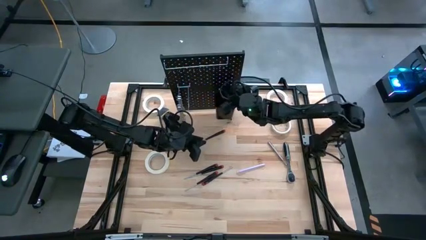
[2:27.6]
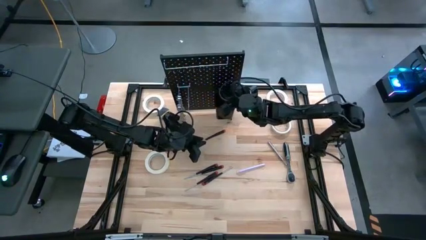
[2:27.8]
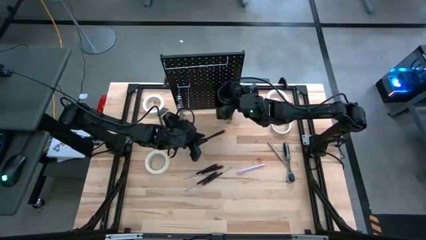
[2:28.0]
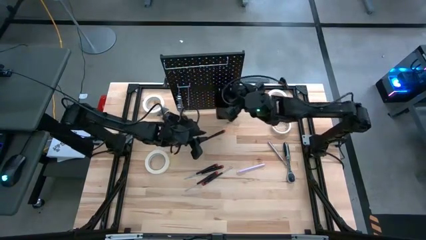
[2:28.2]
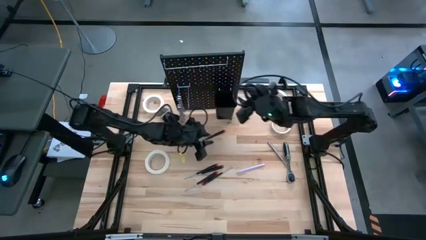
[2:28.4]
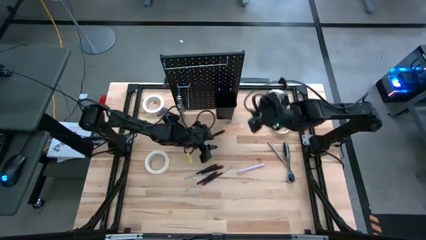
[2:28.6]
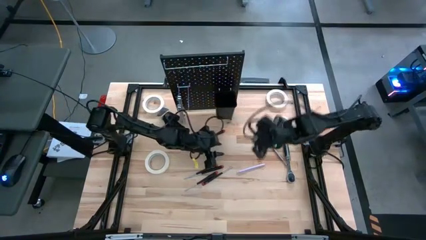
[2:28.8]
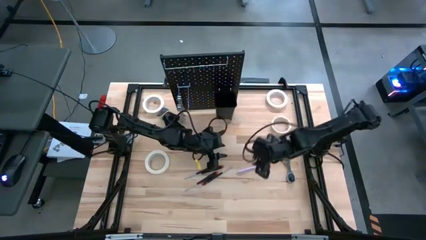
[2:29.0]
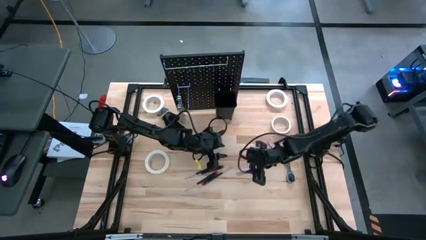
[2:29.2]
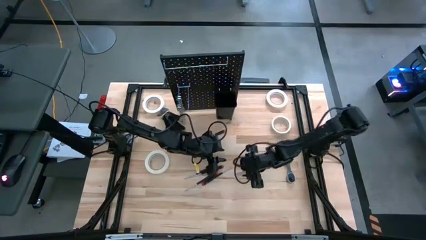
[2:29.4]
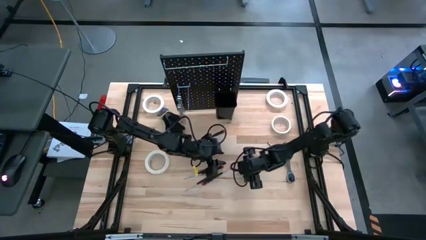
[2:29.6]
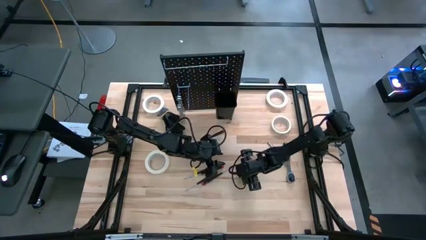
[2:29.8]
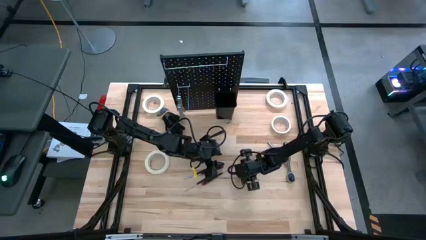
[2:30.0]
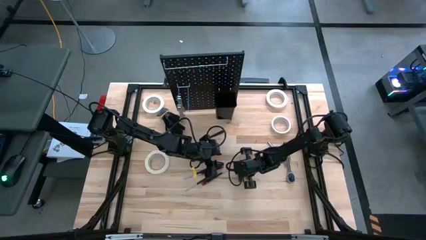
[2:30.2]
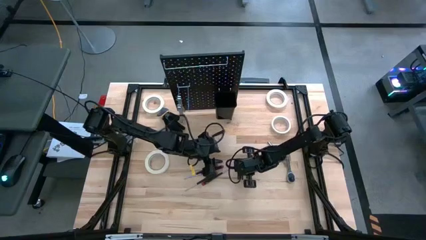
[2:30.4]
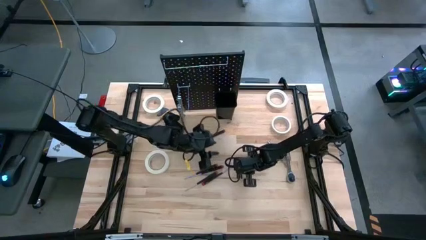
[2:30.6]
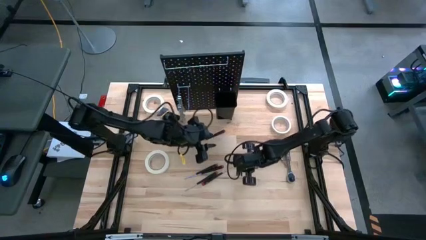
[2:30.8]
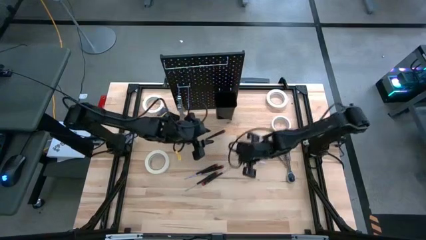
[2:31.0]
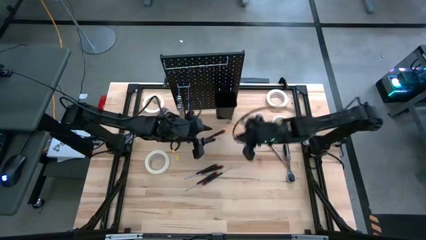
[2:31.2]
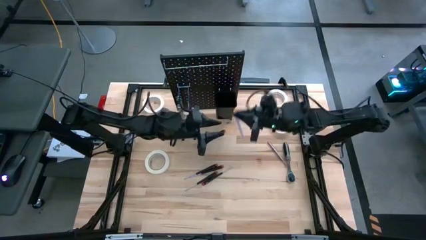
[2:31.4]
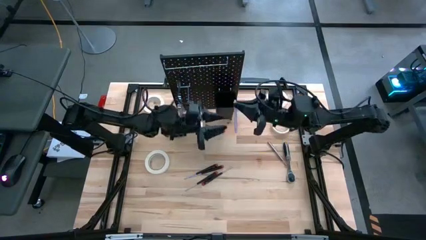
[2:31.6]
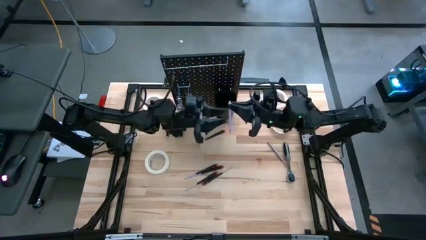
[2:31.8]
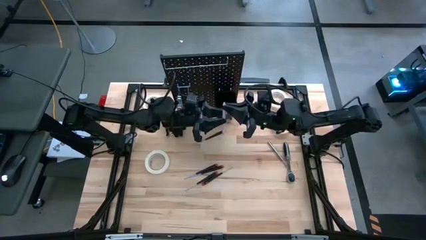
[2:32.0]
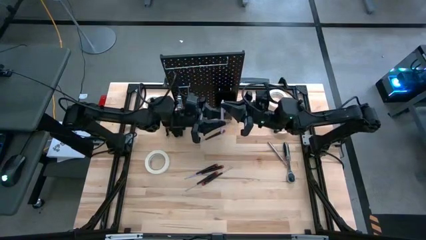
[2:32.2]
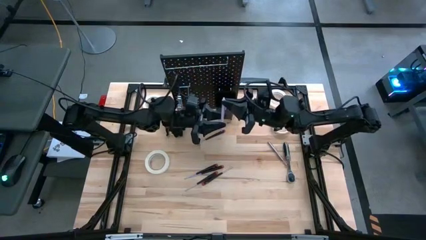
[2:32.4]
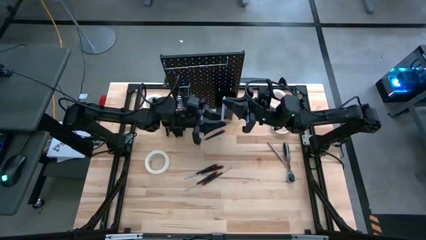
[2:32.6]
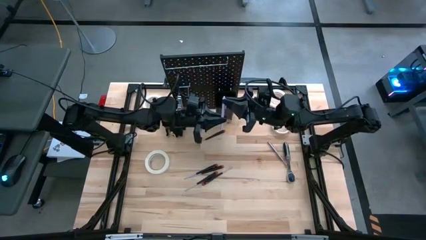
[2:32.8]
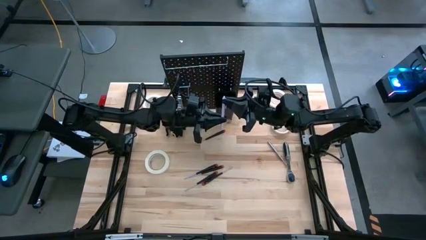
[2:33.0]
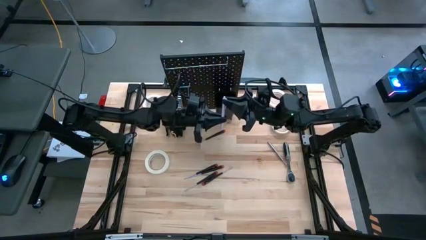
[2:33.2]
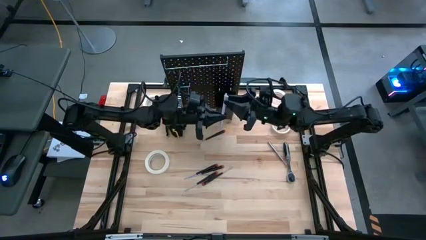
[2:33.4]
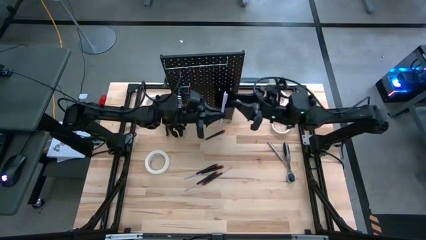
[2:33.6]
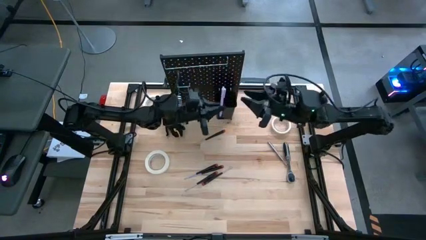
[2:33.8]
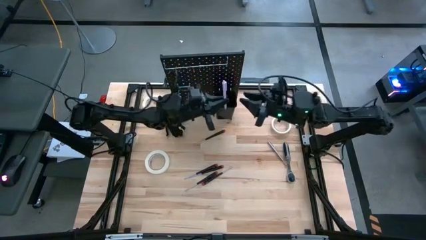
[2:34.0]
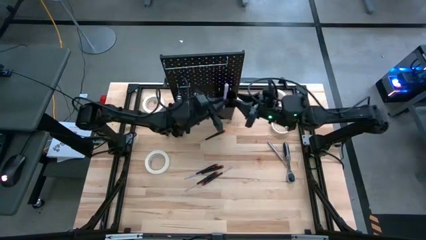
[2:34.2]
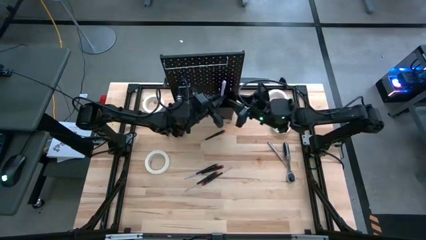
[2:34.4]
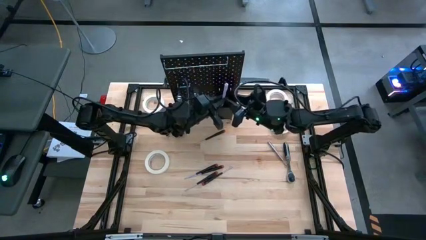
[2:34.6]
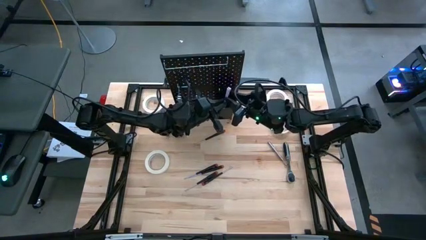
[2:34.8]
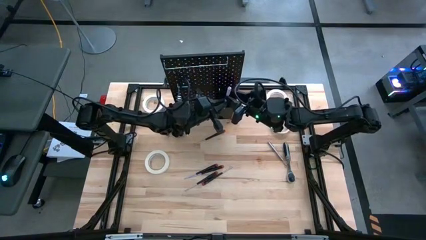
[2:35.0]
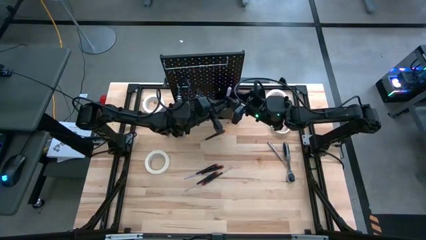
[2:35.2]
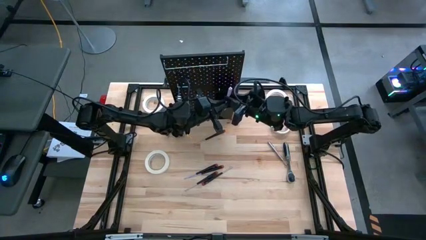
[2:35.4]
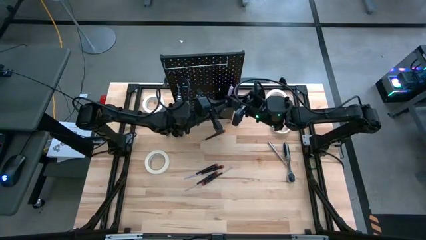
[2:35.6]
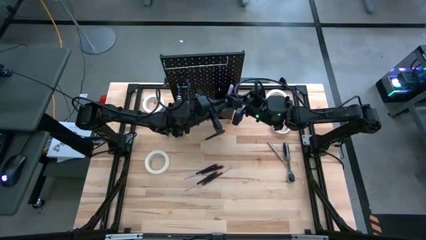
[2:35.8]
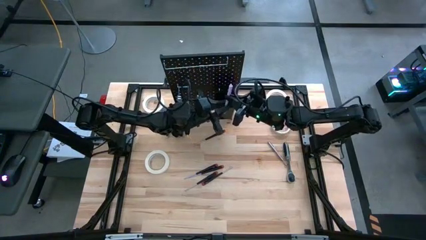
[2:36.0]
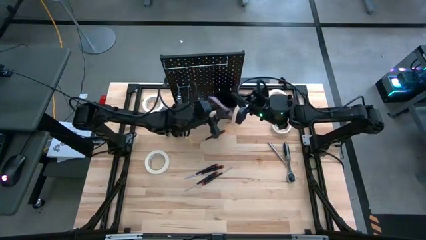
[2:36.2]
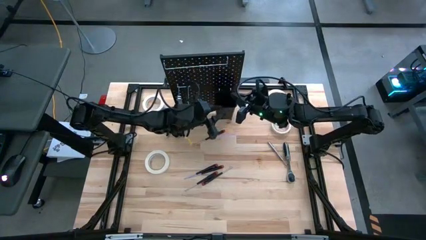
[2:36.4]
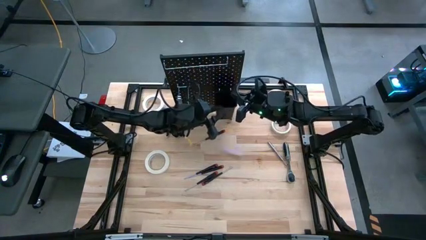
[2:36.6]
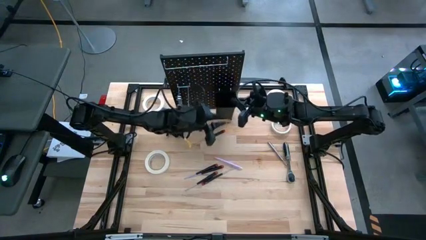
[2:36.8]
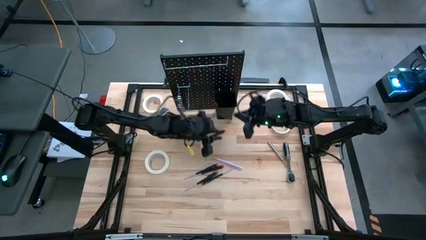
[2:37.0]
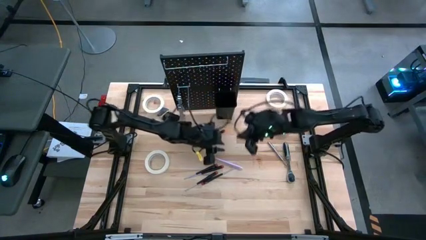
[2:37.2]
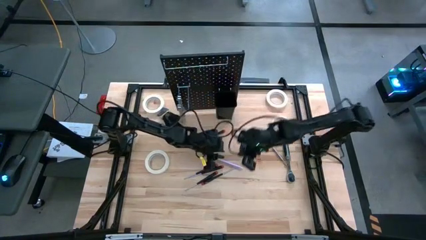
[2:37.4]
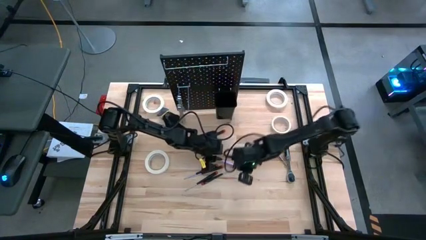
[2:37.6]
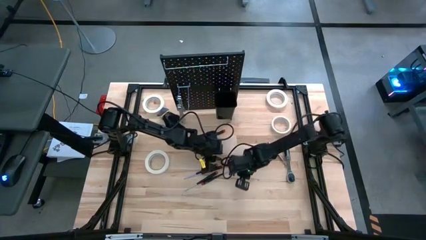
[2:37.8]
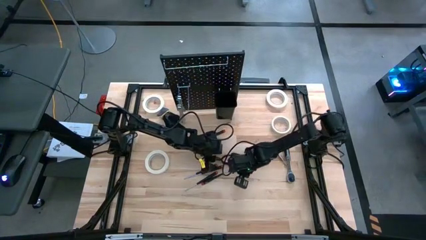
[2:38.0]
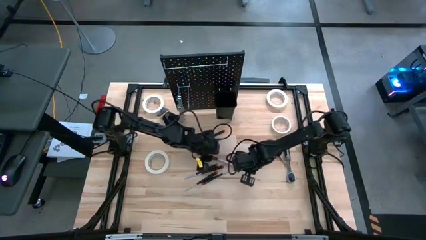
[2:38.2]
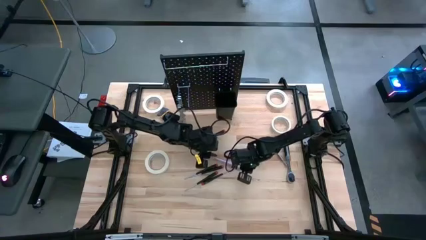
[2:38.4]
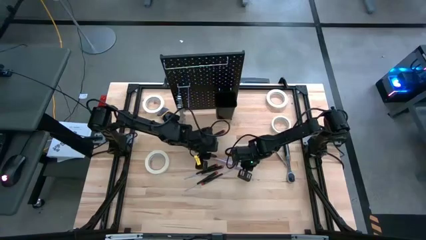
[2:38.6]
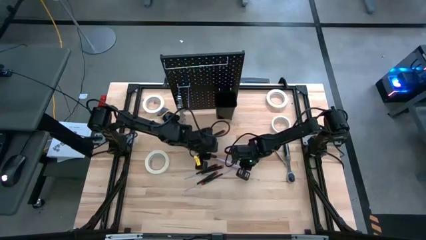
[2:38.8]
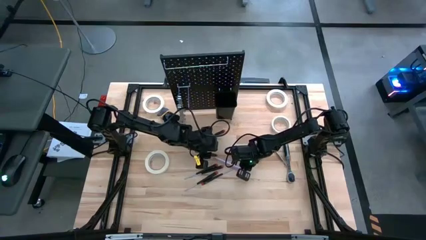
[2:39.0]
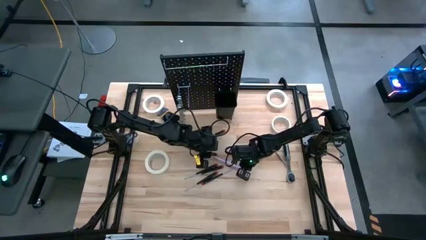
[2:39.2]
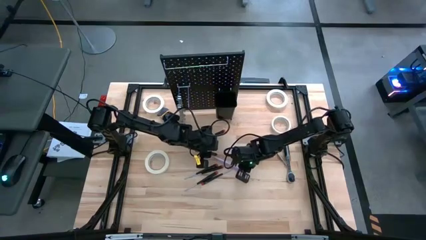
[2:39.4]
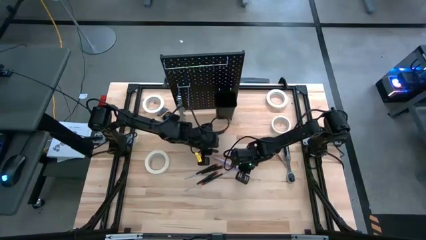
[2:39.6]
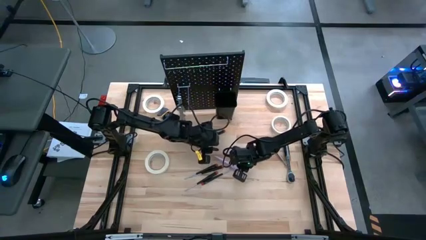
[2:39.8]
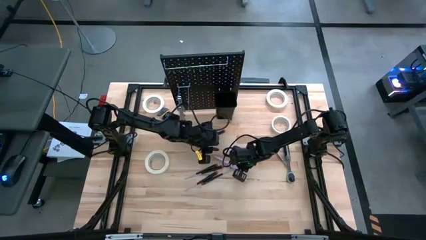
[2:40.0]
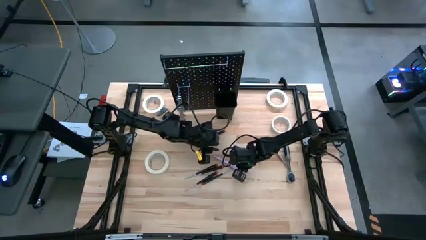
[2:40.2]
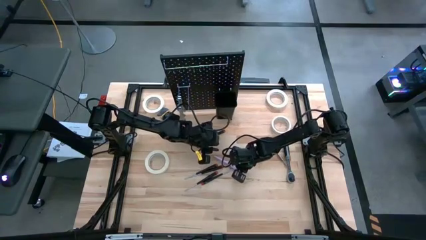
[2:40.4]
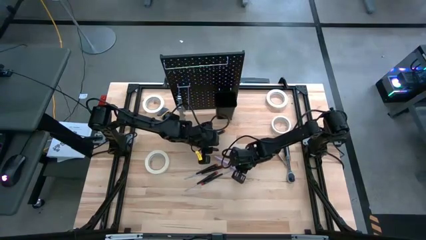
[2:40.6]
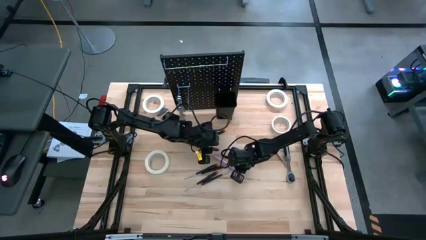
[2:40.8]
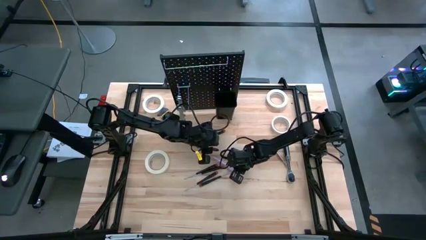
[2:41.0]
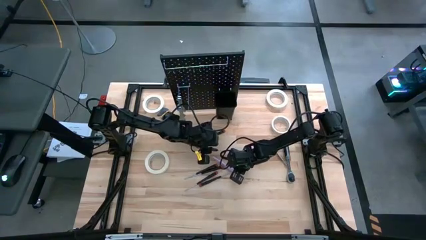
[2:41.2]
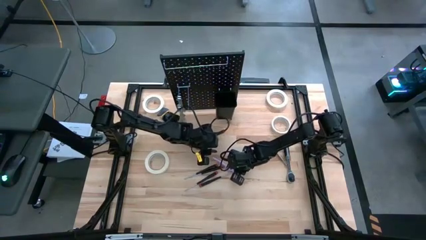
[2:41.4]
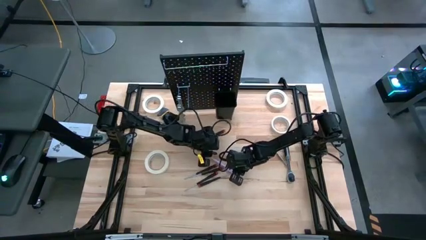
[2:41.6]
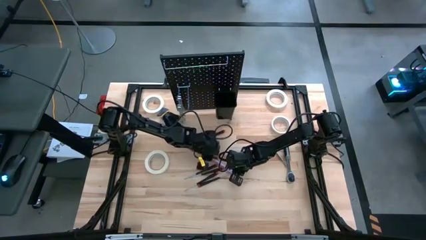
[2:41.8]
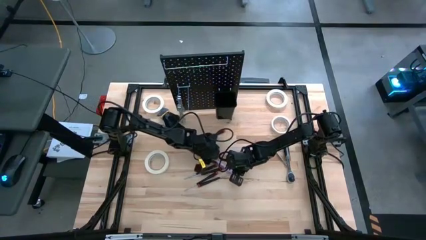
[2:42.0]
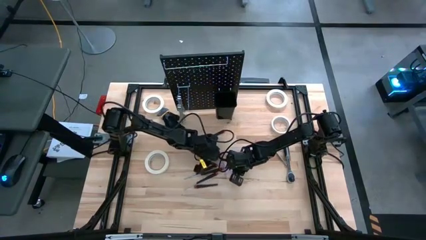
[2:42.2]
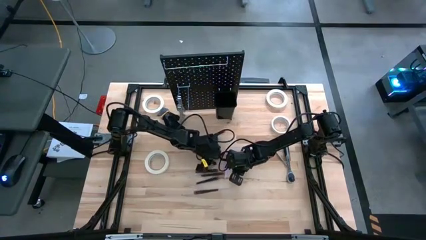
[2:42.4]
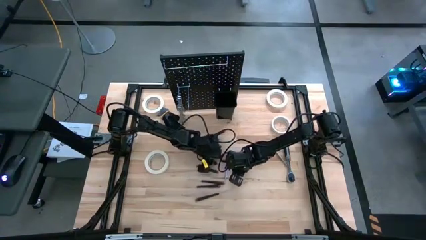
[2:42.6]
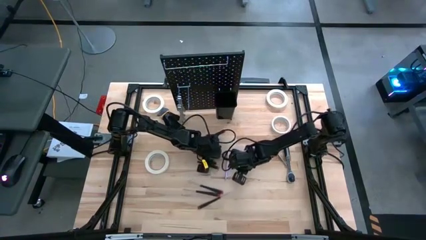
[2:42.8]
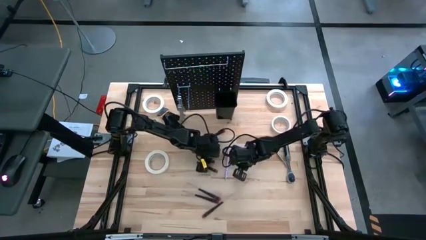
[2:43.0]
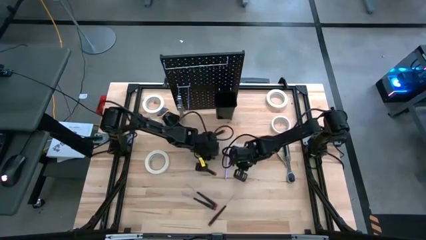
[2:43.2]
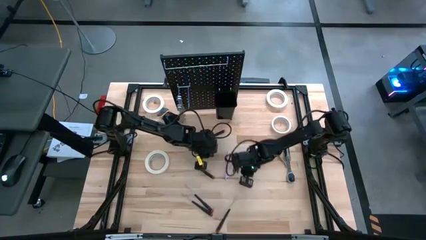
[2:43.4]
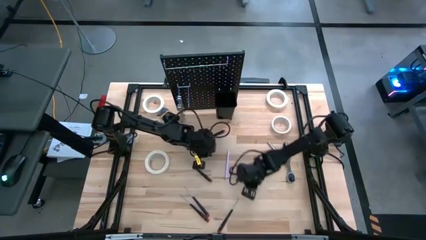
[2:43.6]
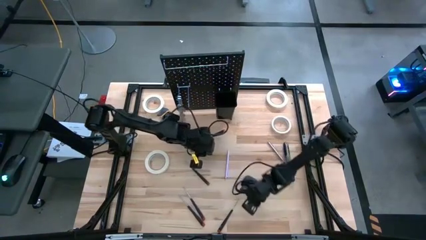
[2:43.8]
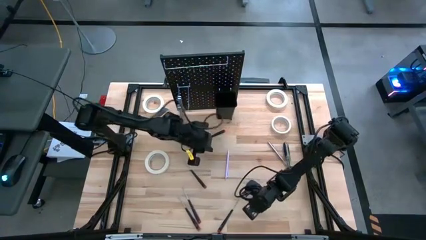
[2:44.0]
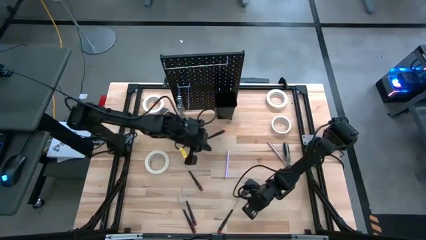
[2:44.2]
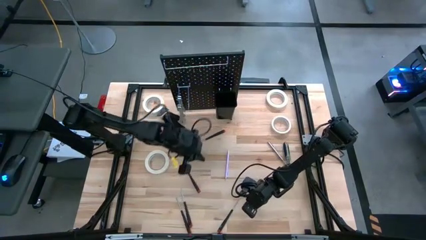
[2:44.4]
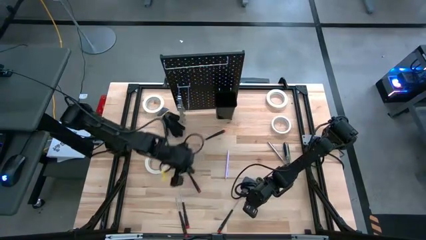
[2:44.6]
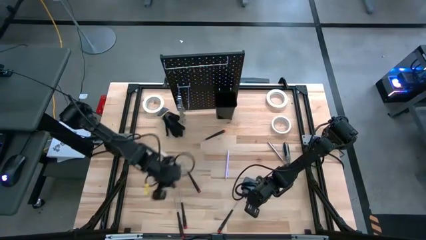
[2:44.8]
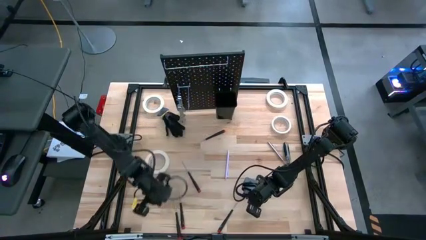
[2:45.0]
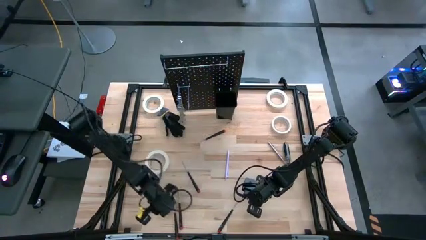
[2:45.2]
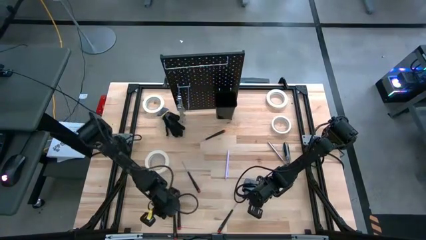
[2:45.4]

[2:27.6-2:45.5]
Task: Hang tools onto peg board
Put the purple pen into the black bin on the peg board
